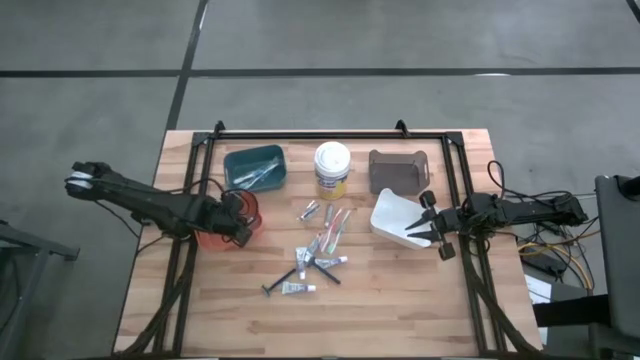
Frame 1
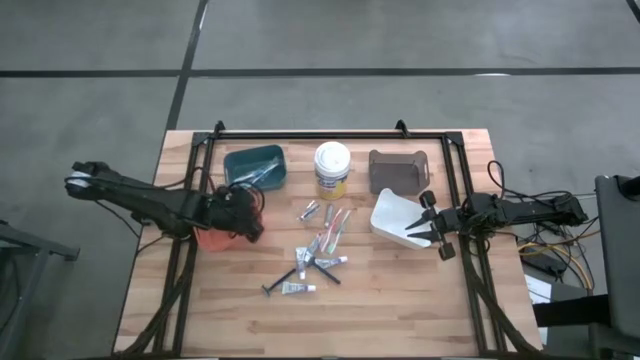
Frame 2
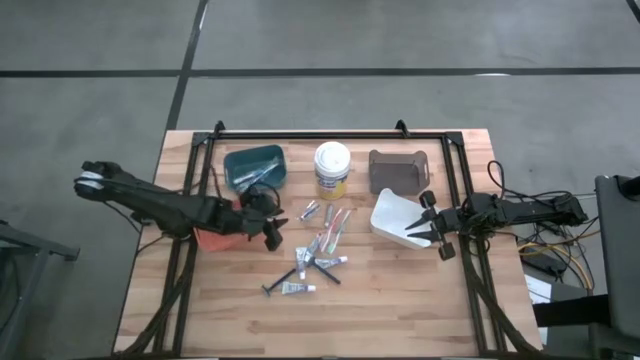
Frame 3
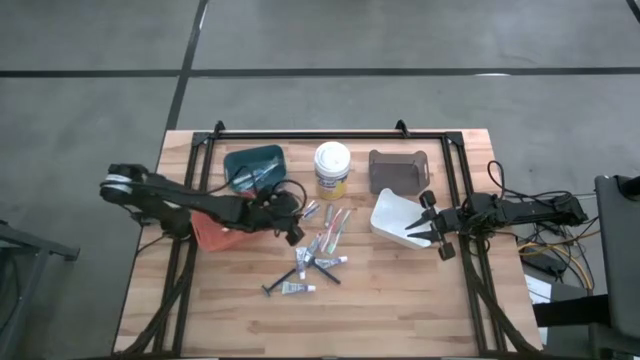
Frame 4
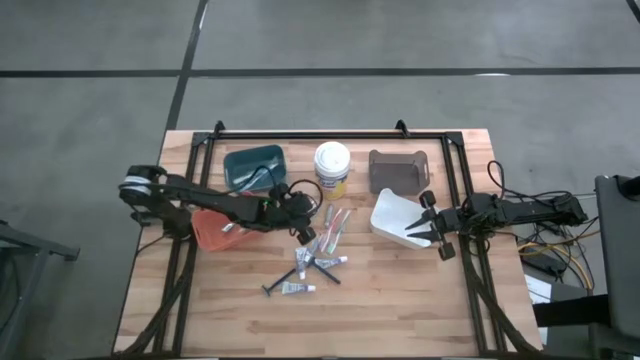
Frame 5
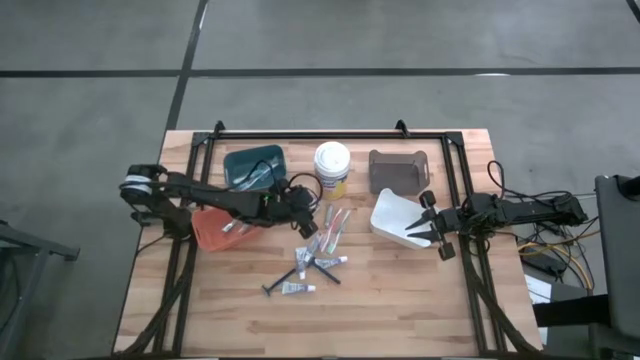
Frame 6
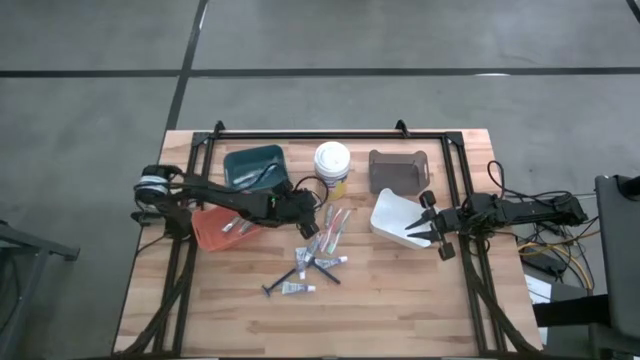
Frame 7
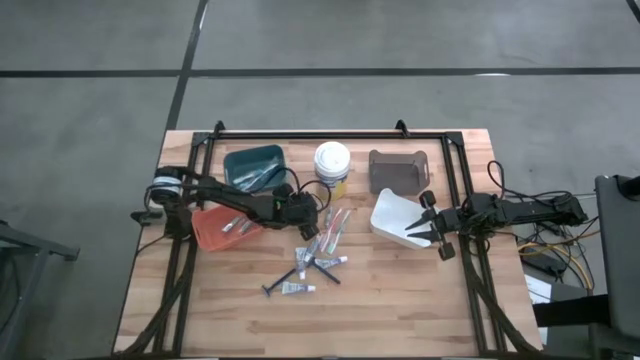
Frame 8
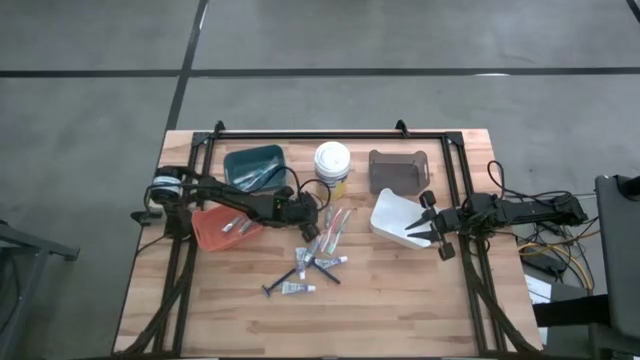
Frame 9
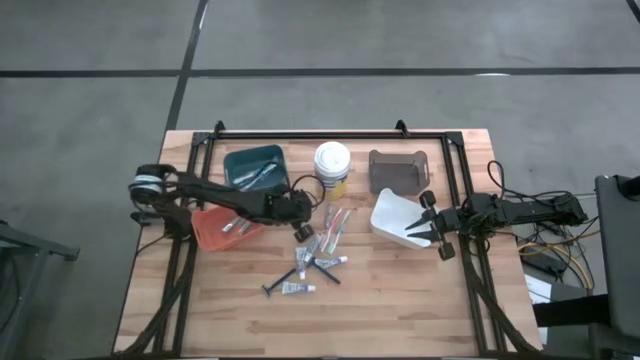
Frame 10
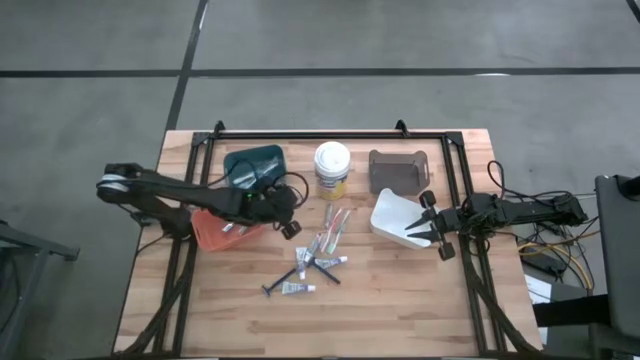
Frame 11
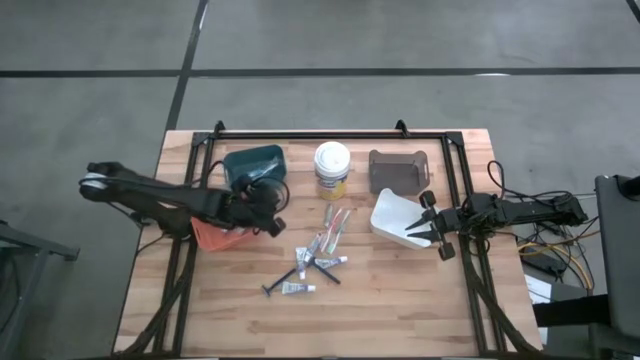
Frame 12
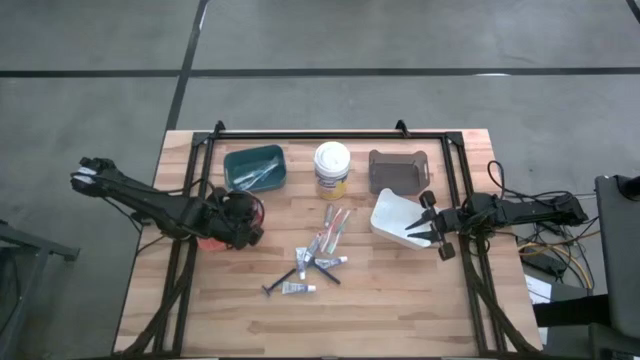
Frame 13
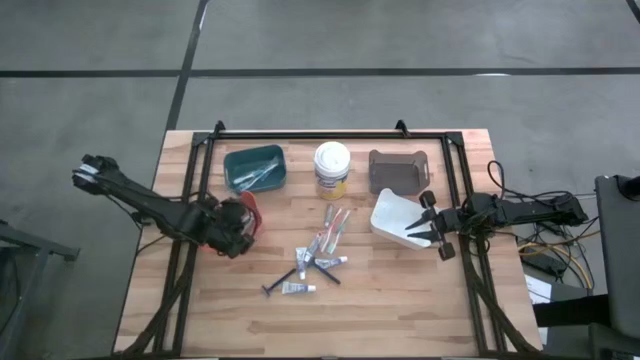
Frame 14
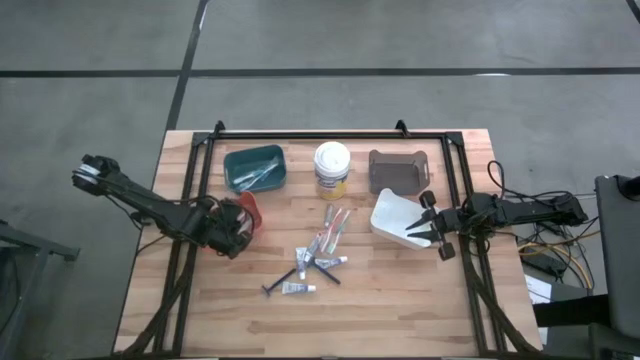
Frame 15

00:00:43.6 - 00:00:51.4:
Task: Pick & Place Travel size toiletries
Put the left nail cutter into the orange bin

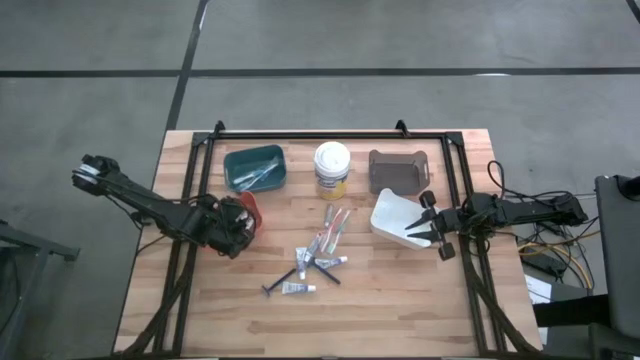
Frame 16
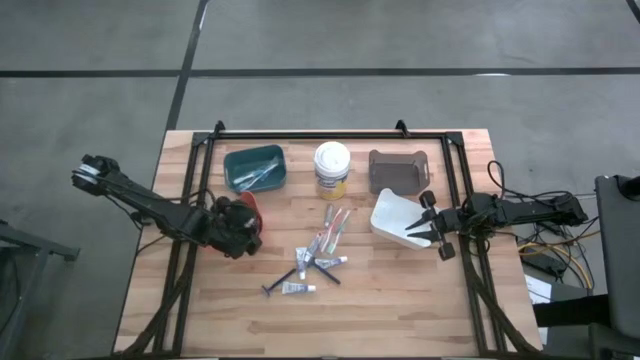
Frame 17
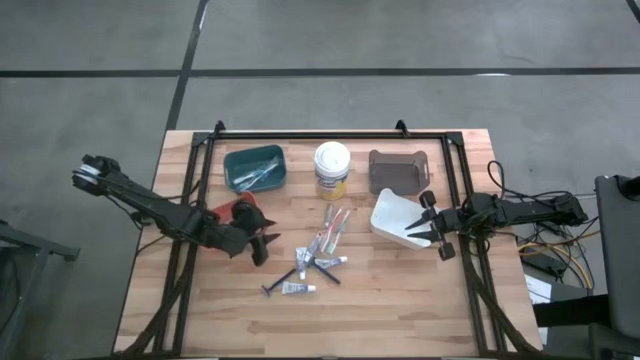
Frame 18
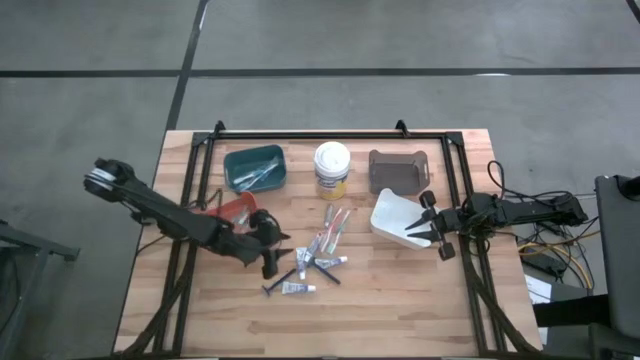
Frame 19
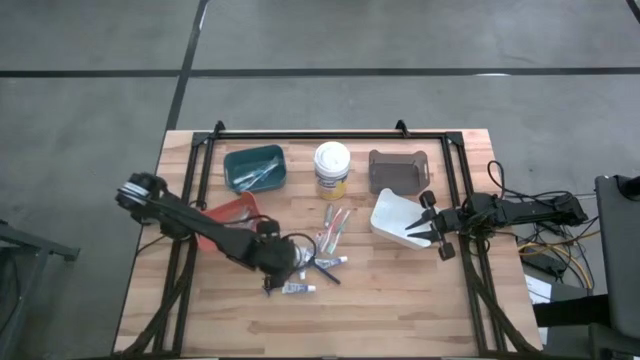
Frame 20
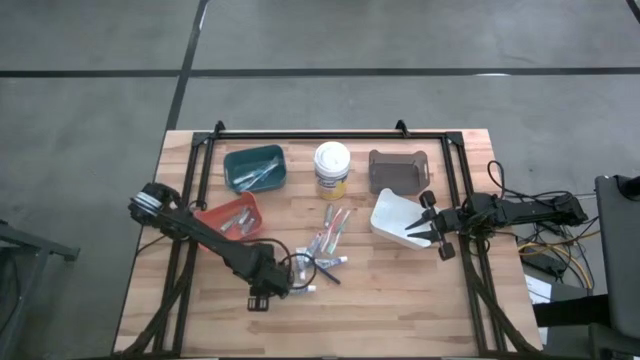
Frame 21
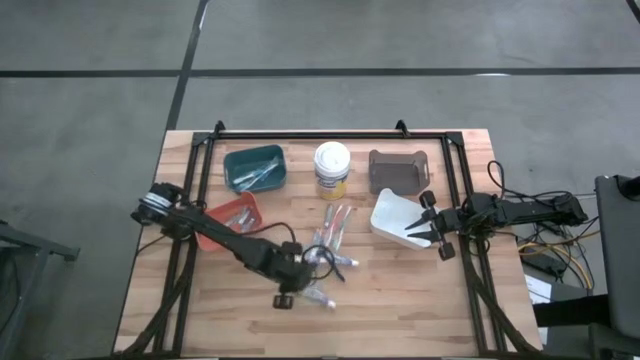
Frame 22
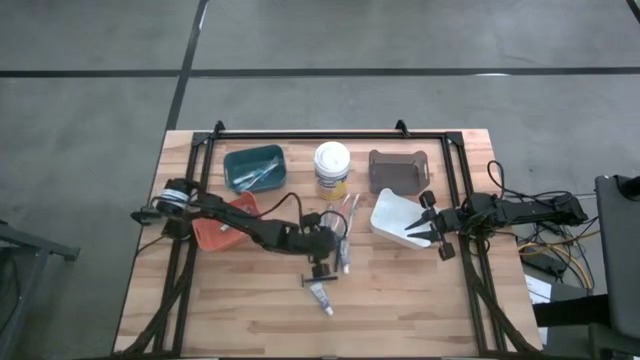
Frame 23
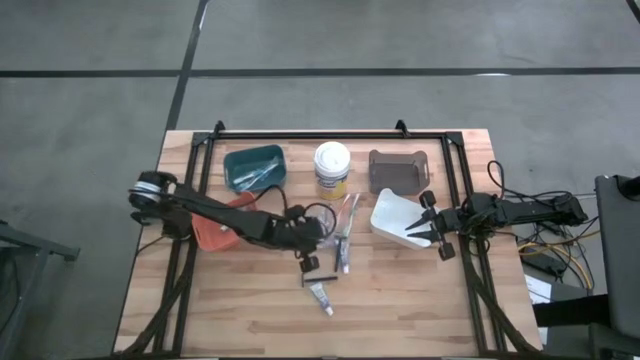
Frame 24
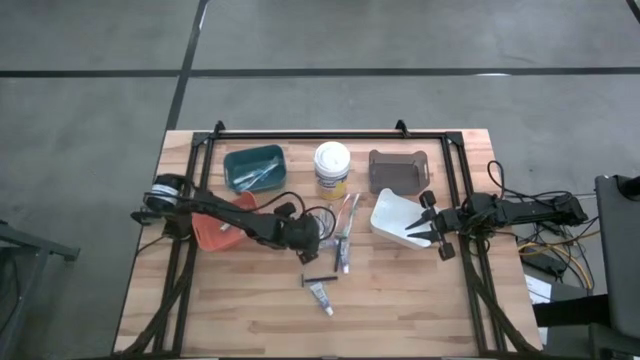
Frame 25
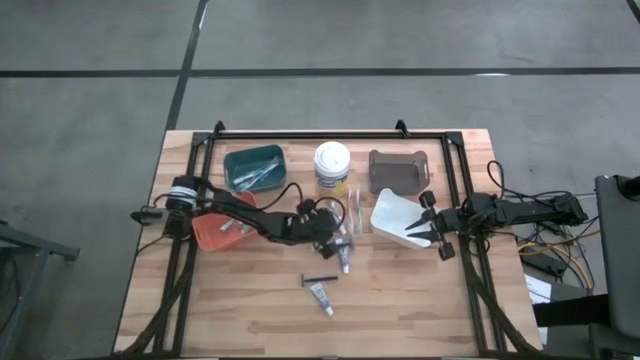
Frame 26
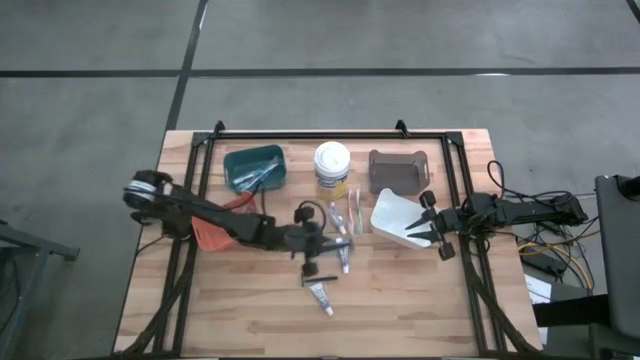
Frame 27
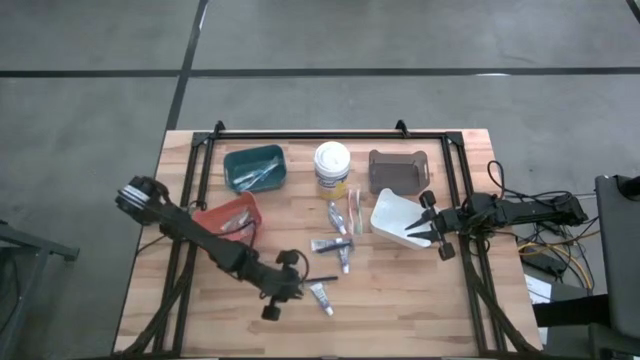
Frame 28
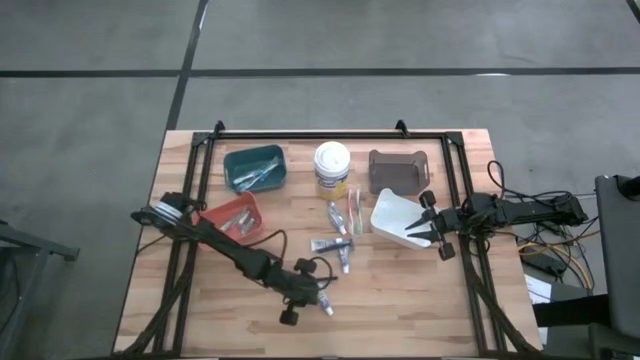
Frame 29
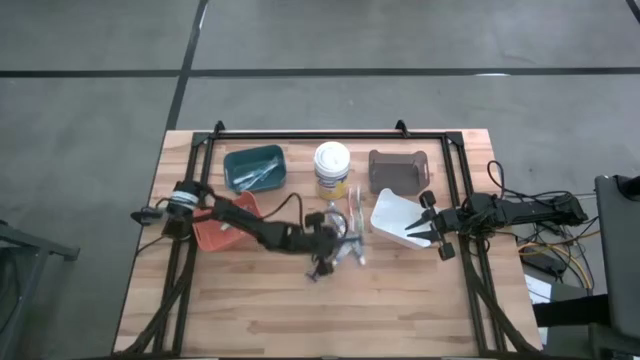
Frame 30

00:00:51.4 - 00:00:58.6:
Adjust the toiletries on the table

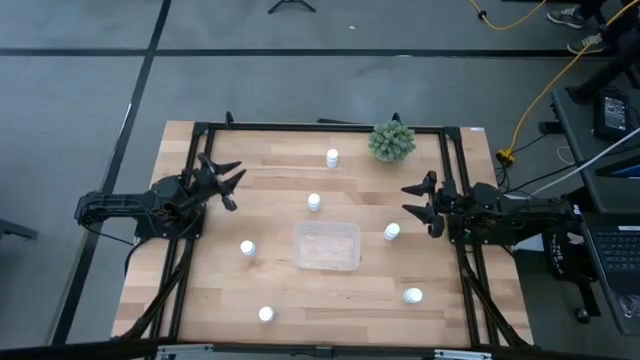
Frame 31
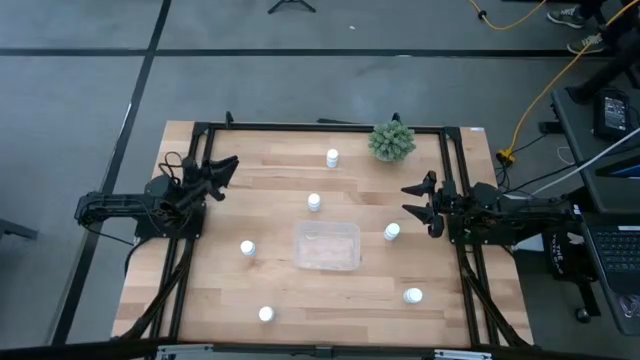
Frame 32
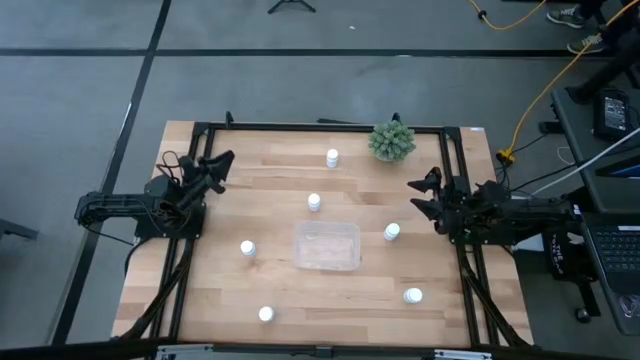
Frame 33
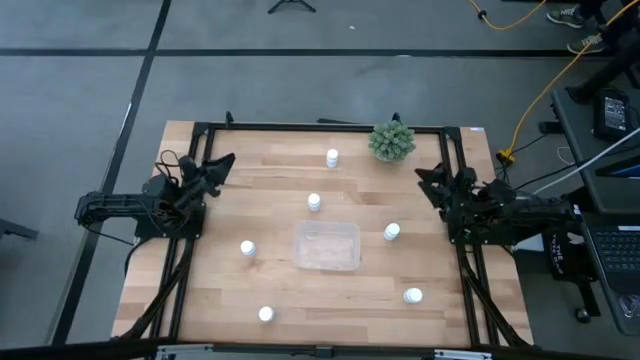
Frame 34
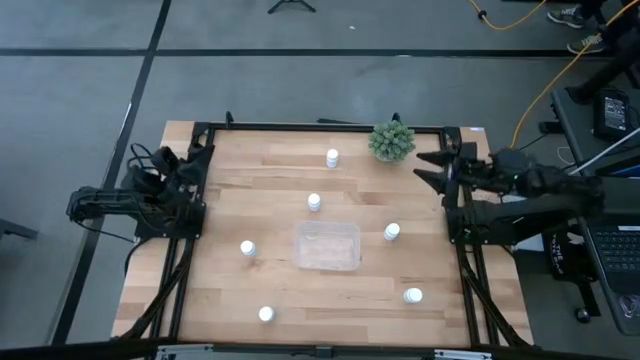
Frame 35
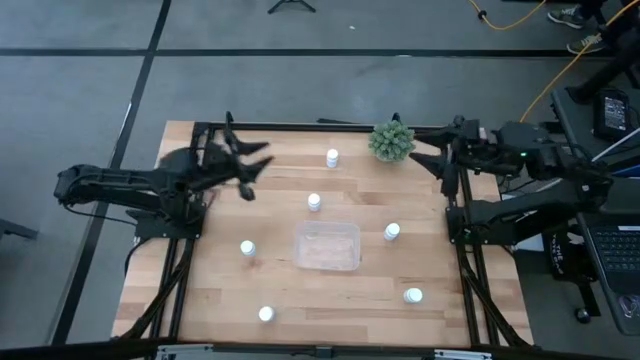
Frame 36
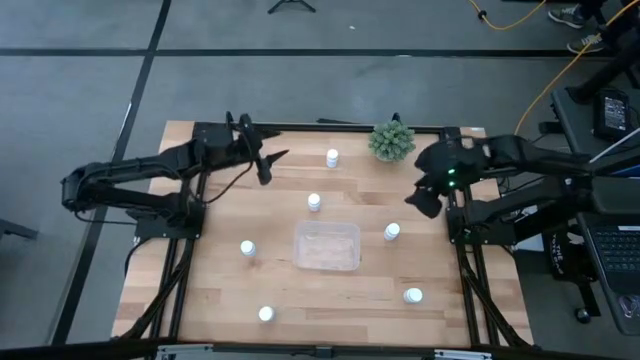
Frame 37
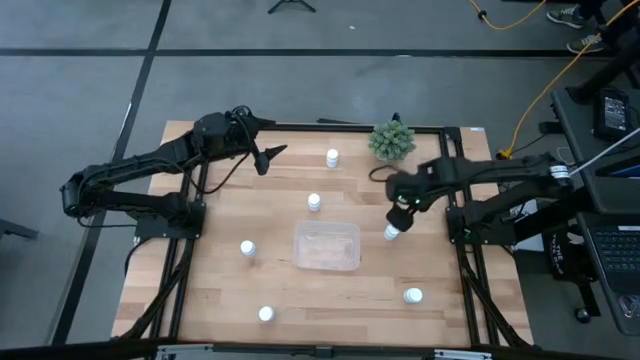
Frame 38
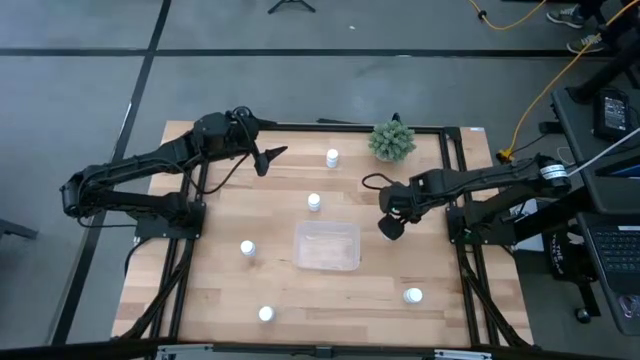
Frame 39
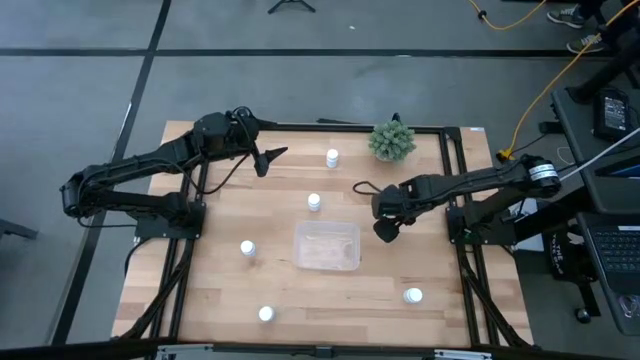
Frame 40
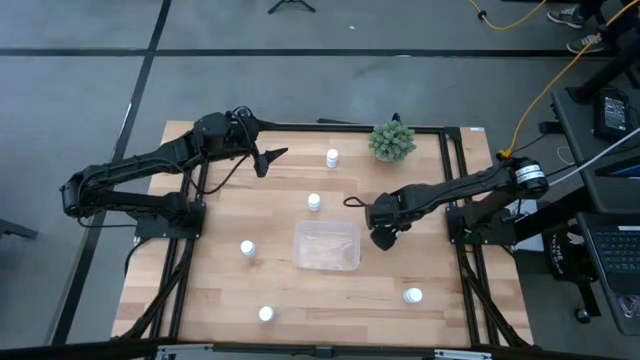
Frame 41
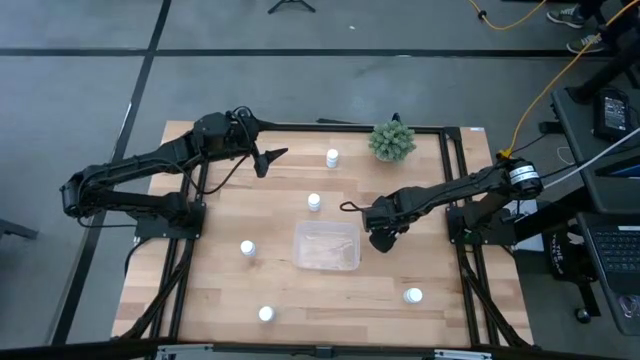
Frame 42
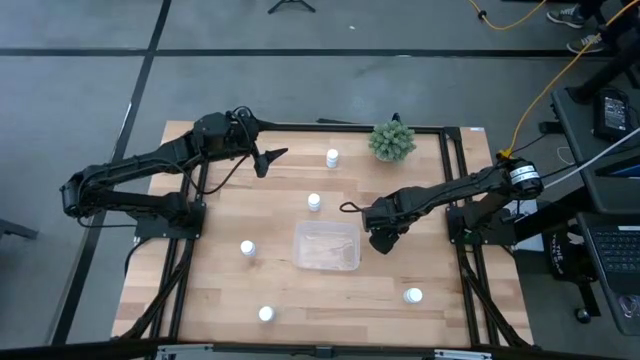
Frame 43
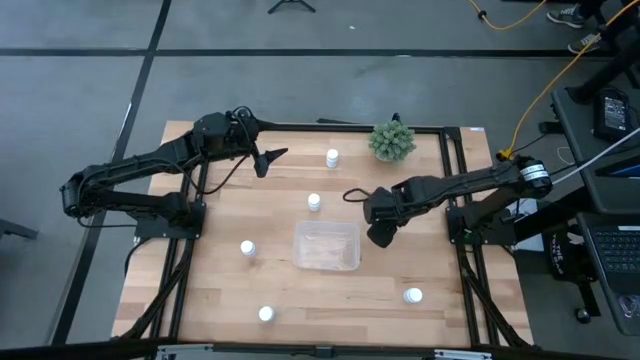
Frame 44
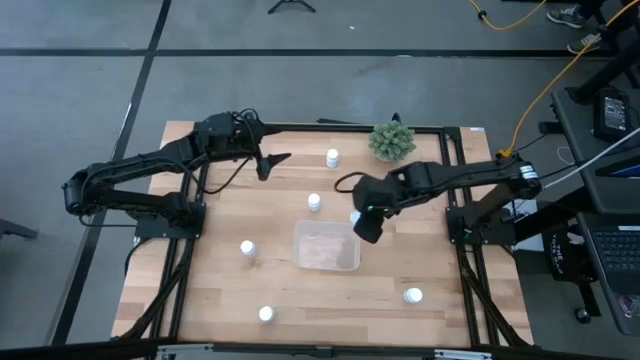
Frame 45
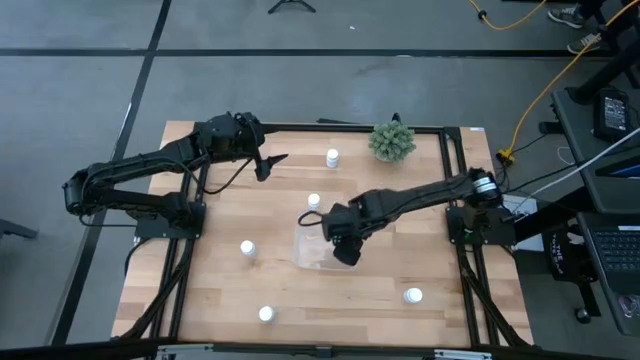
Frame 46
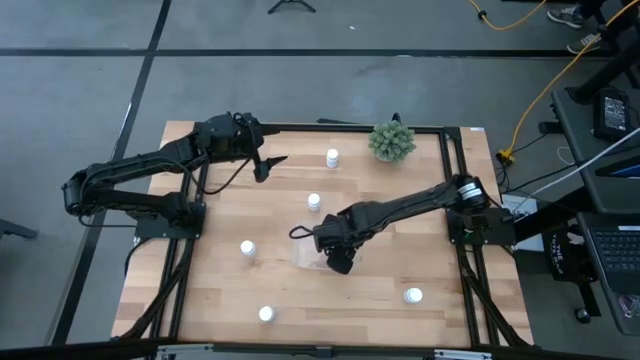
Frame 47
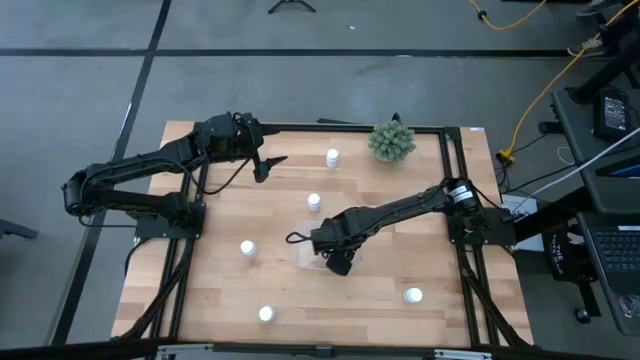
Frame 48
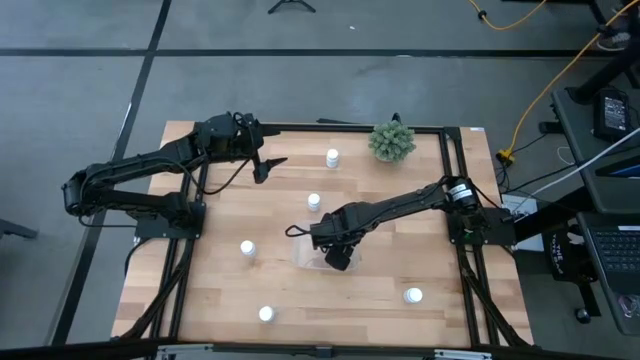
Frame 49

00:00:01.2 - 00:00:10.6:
Task: Pick and place pill bottles into a basket
Put the white pill bottle into the transparent bin
